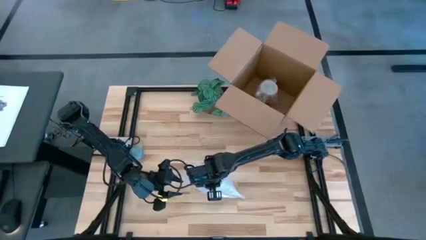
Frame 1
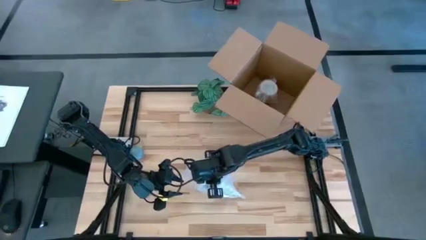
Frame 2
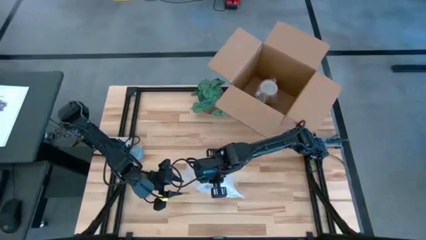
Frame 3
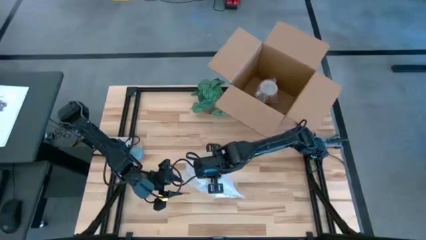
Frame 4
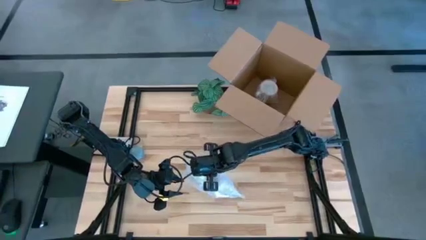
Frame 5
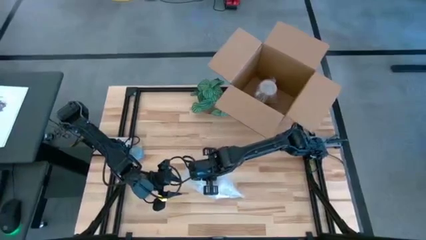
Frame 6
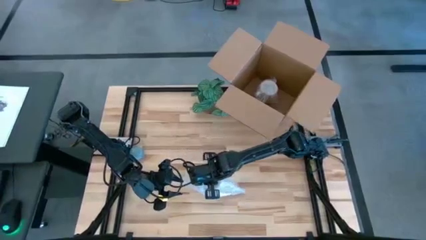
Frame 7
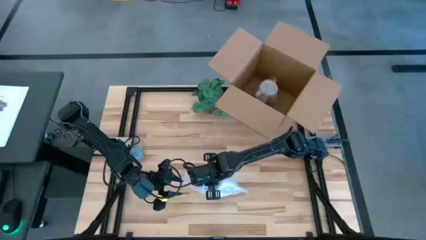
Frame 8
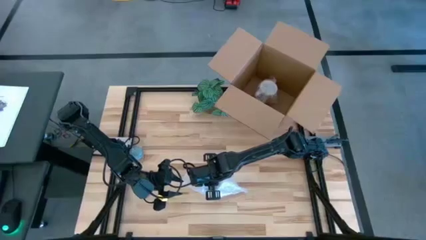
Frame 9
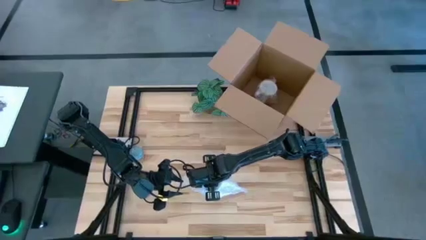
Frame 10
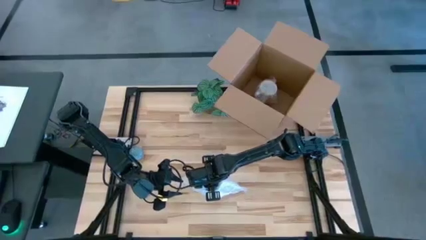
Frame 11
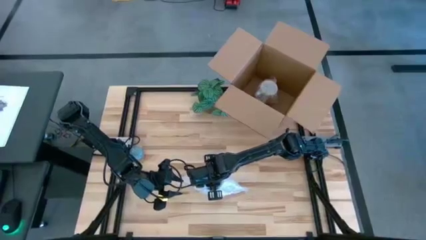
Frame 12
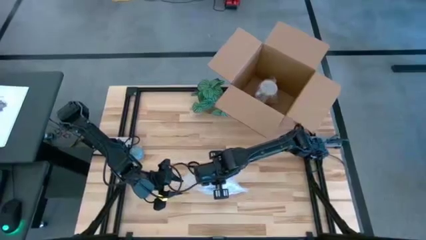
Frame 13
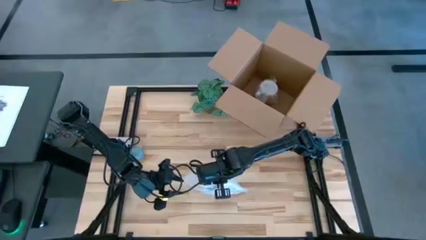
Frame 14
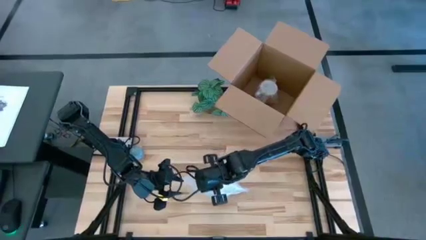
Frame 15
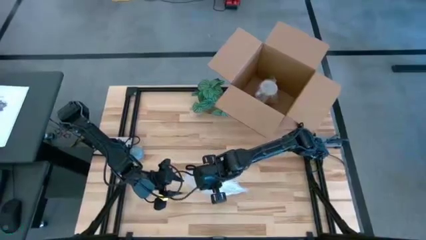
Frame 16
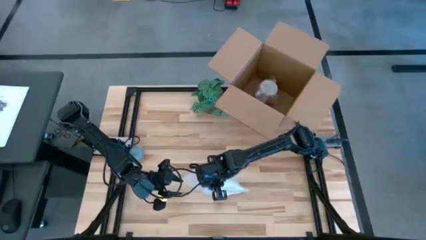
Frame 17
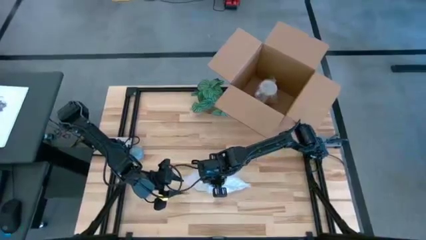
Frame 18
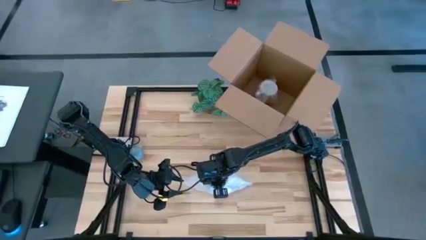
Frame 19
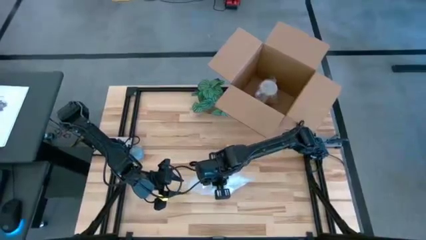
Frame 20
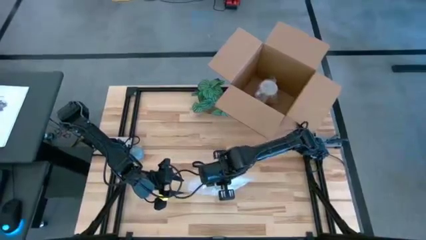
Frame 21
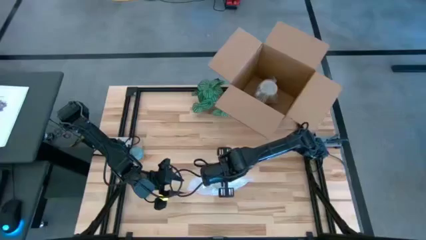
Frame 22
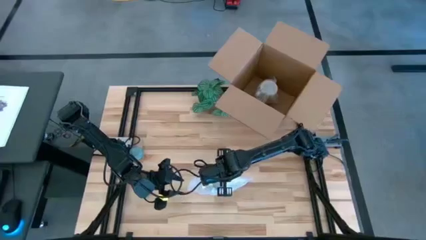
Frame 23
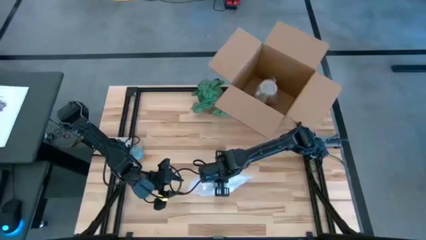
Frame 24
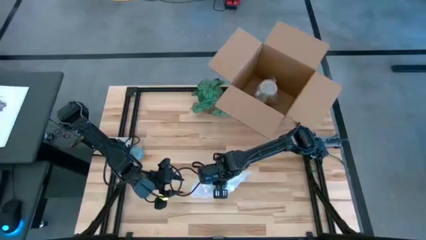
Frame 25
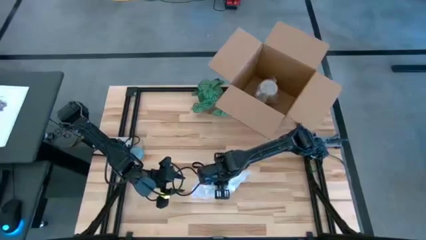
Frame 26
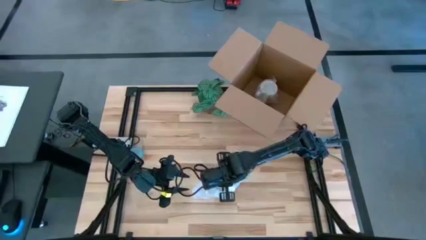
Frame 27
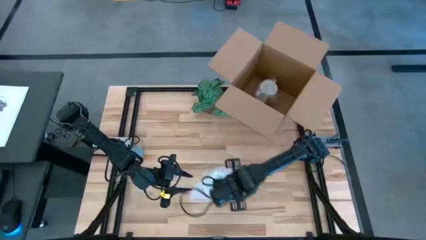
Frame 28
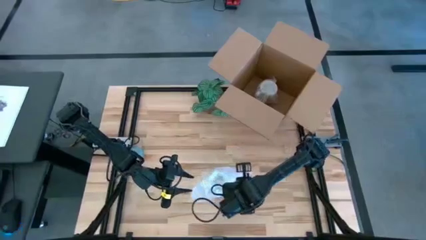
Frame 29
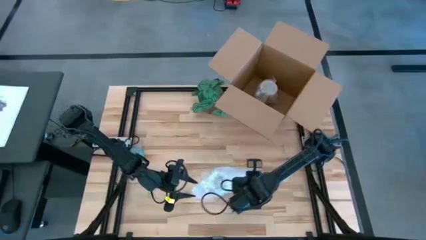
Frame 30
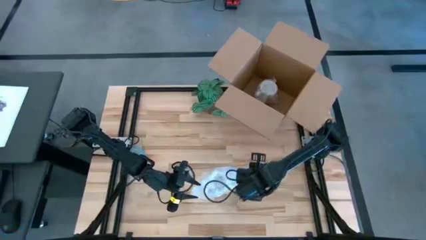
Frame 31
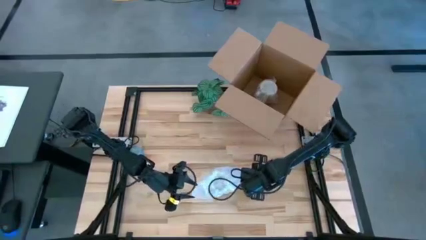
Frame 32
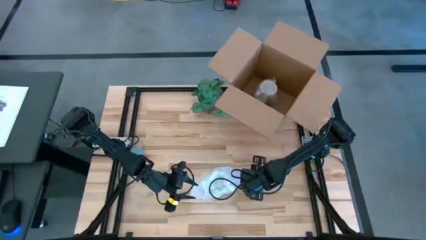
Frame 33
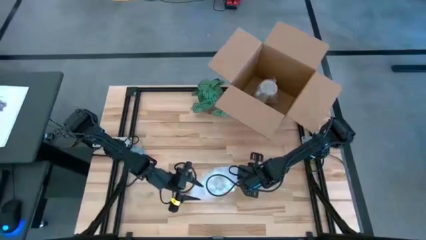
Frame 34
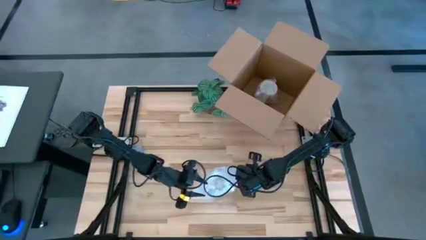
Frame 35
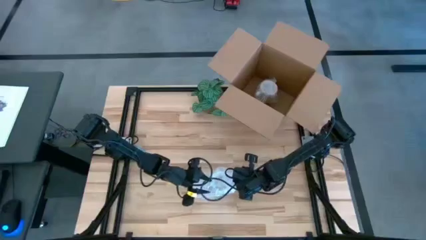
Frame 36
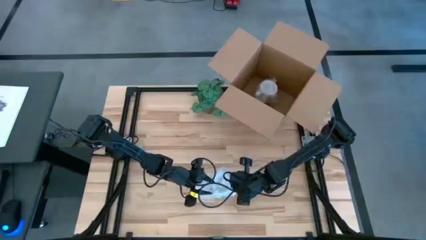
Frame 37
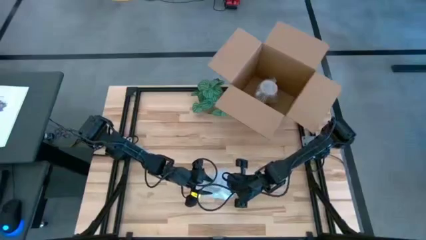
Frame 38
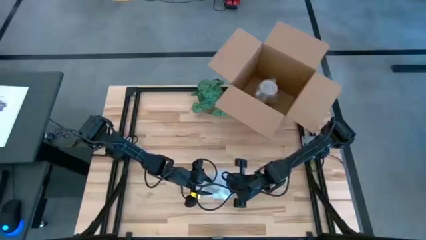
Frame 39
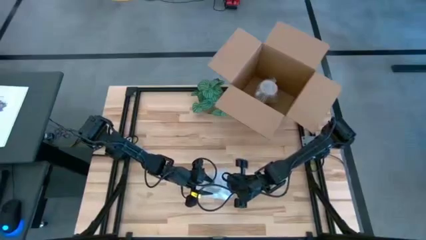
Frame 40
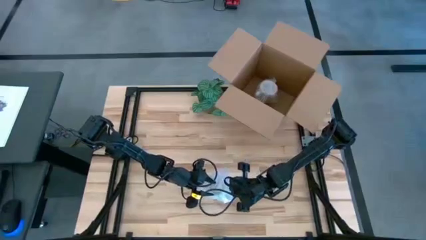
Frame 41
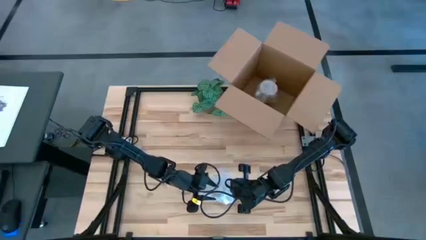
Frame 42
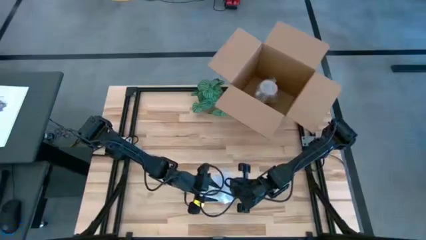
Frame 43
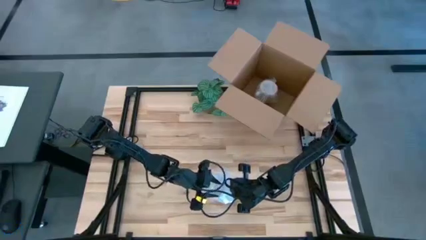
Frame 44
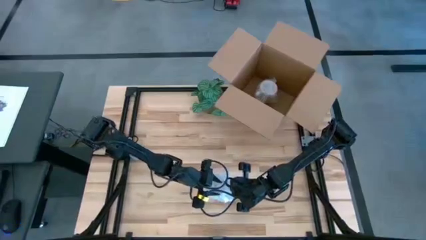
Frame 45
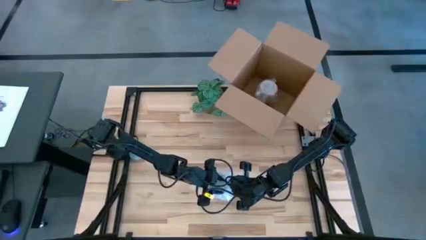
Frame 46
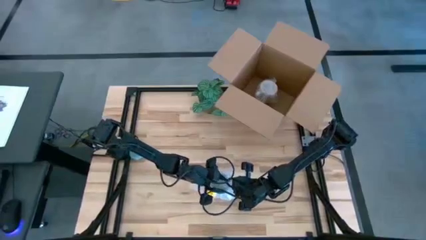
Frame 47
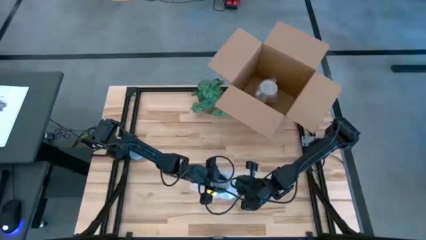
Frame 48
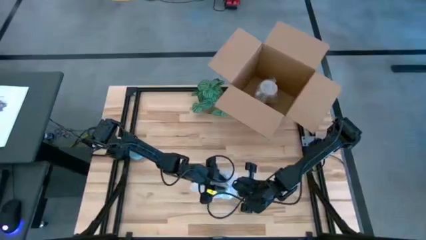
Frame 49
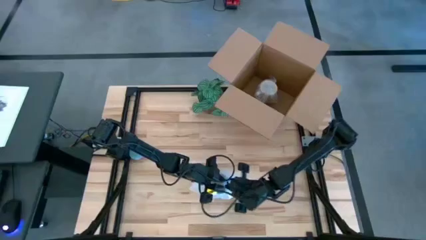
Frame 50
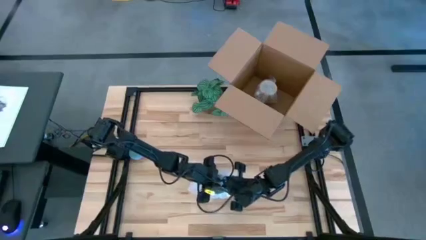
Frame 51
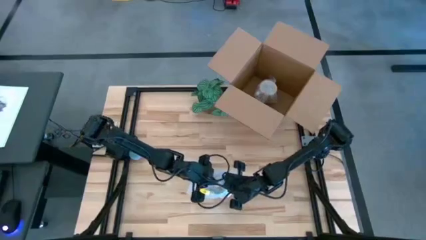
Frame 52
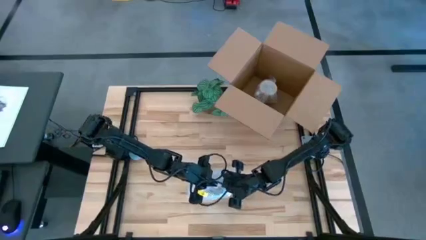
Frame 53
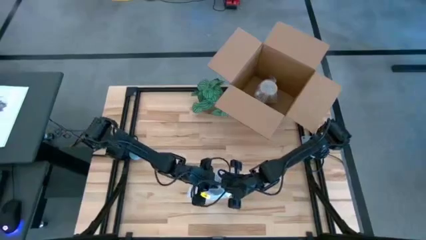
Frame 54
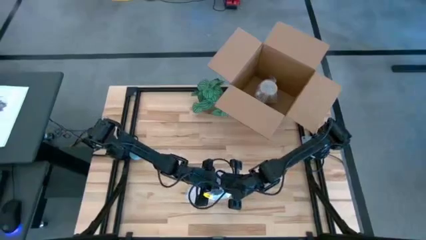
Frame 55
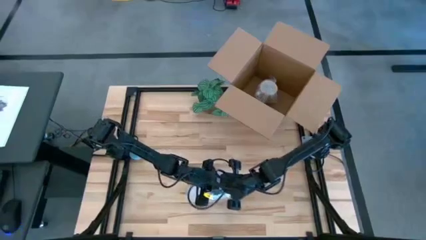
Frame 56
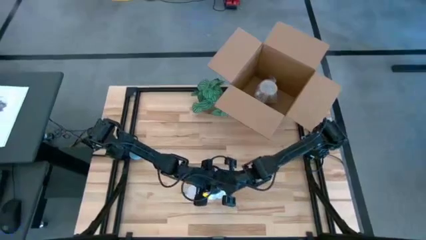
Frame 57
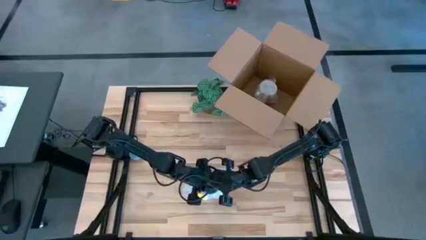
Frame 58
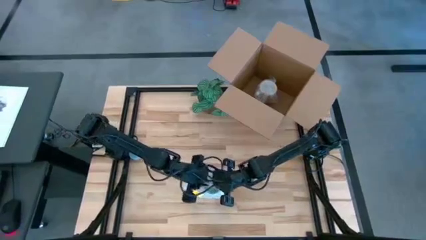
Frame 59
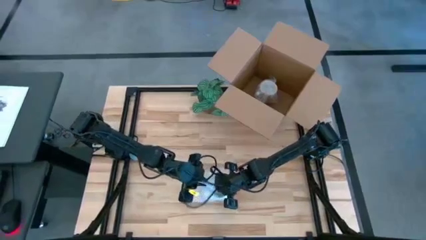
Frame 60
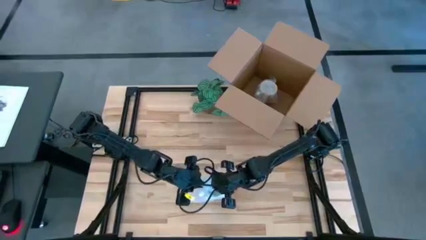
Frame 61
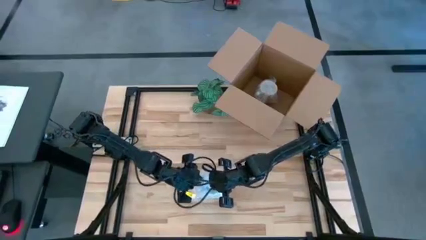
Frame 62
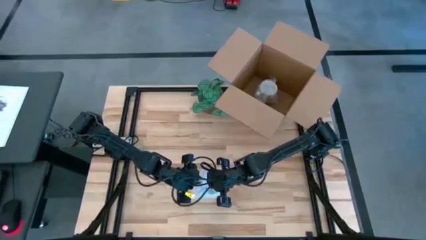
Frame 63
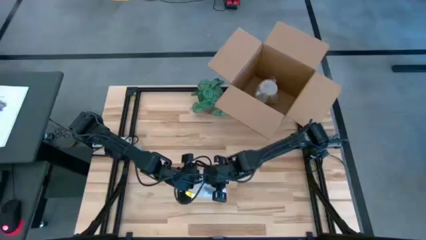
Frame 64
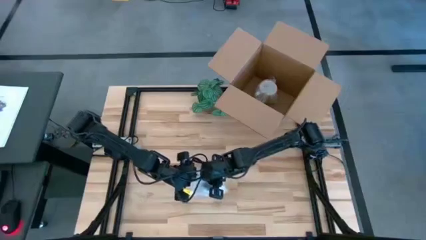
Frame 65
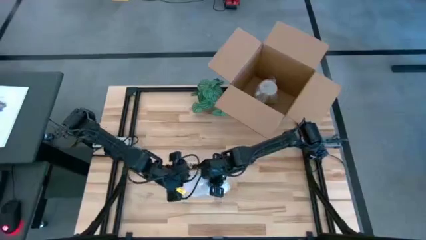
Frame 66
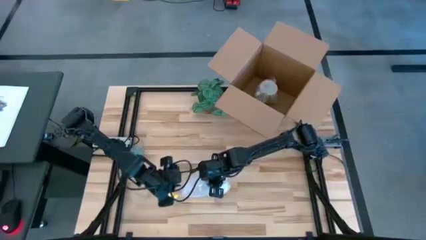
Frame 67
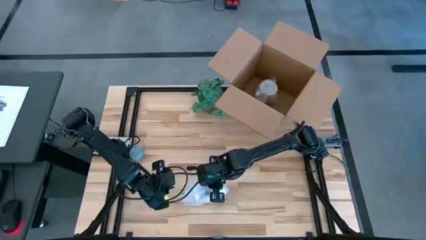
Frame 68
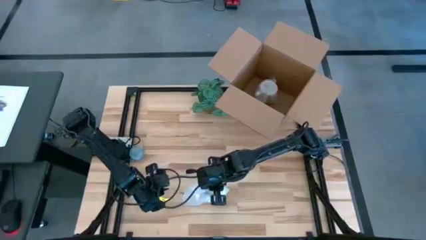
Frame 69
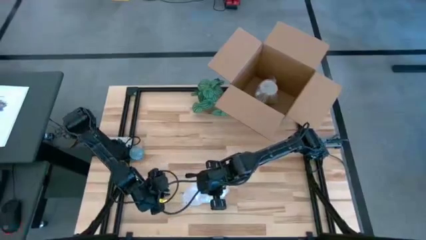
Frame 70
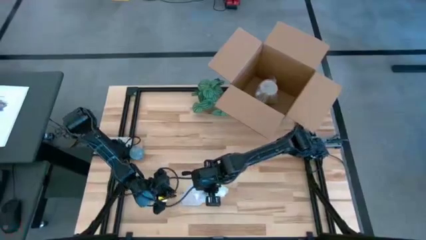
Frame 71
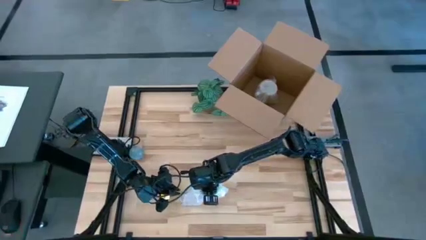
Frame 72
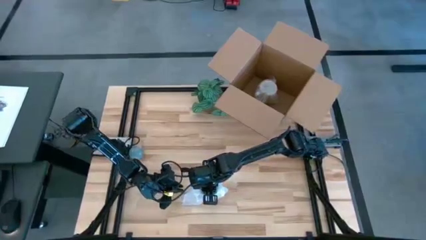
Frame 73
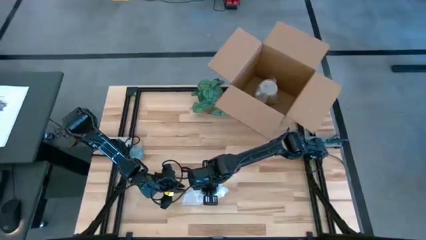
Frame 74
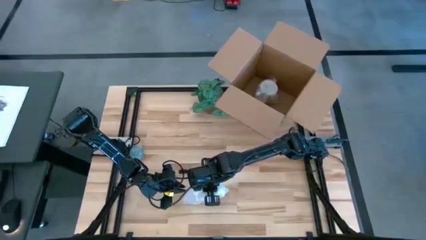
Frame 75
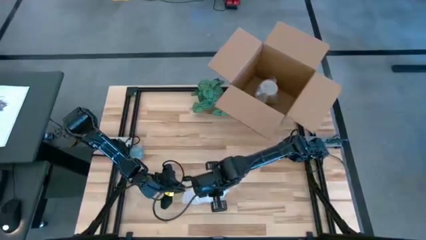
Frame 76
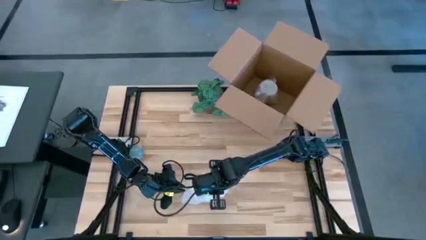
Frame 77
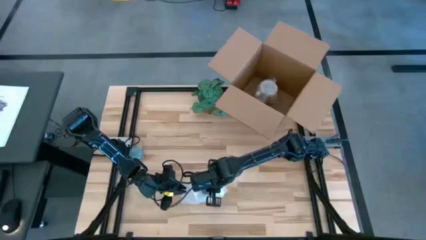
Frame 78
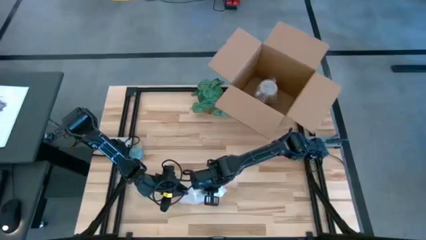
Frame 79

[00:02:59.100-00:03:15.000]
Task: wrap mug
Wrap the blue mug
